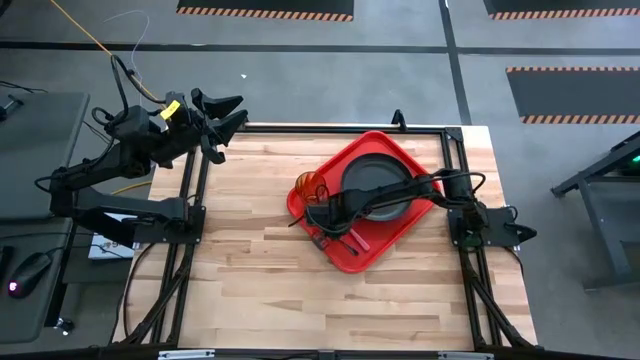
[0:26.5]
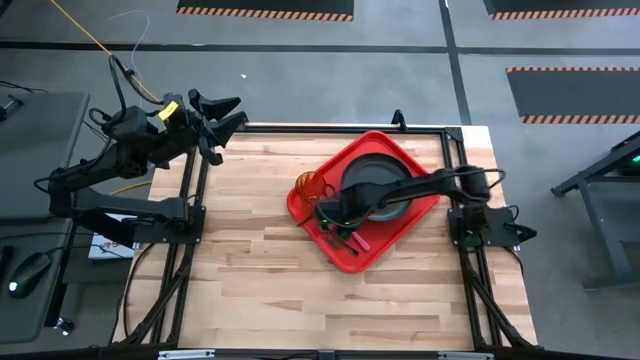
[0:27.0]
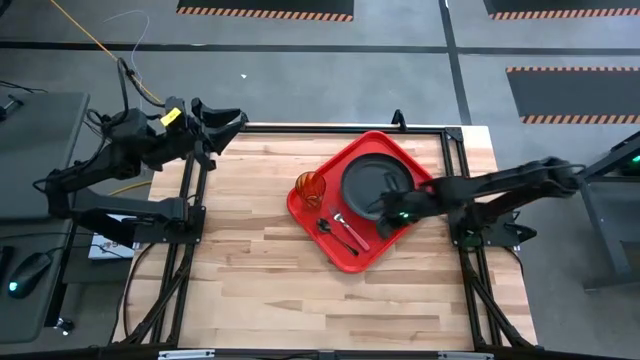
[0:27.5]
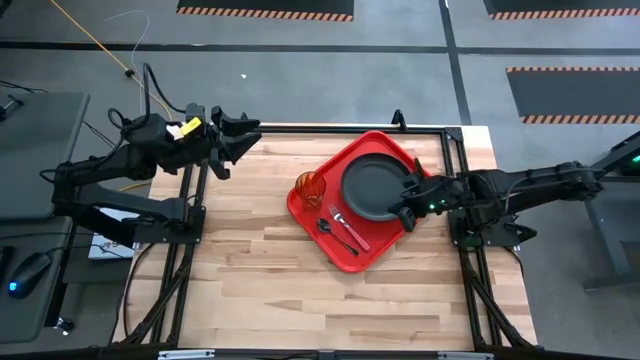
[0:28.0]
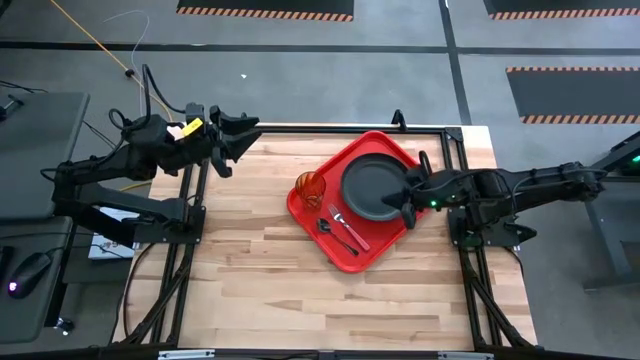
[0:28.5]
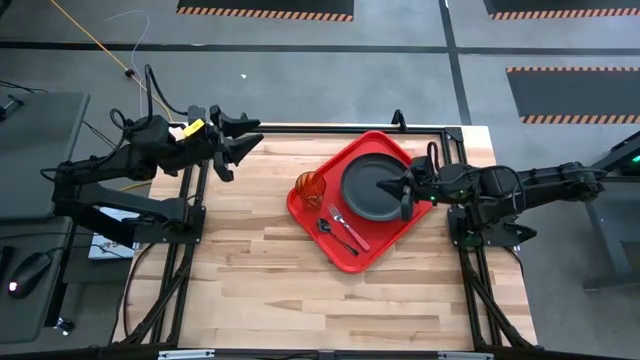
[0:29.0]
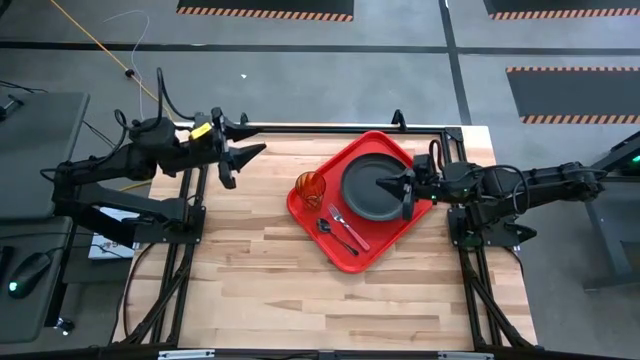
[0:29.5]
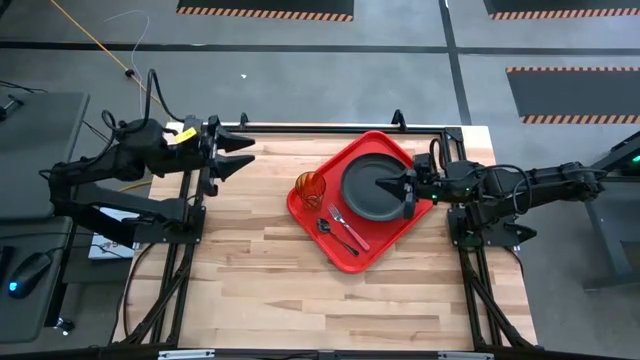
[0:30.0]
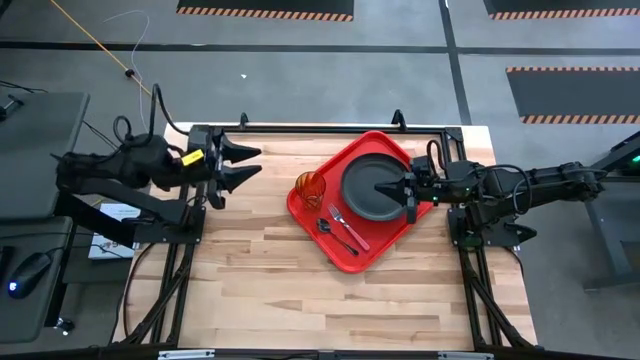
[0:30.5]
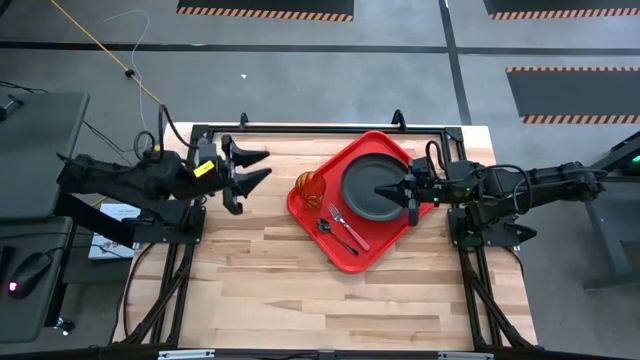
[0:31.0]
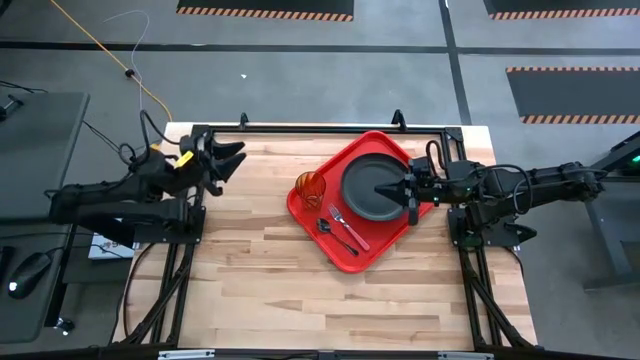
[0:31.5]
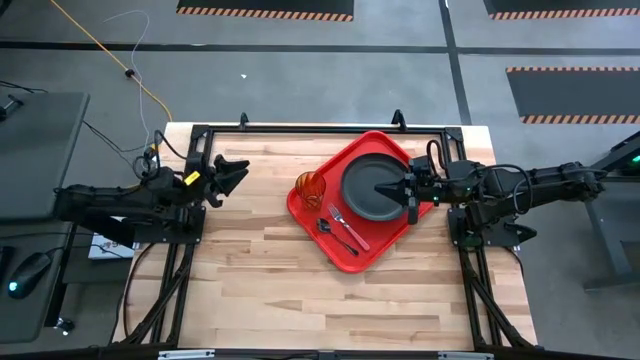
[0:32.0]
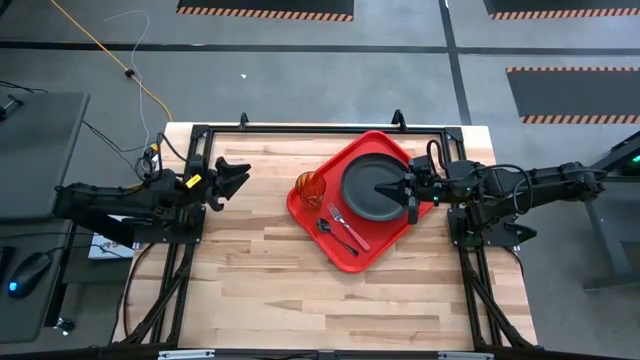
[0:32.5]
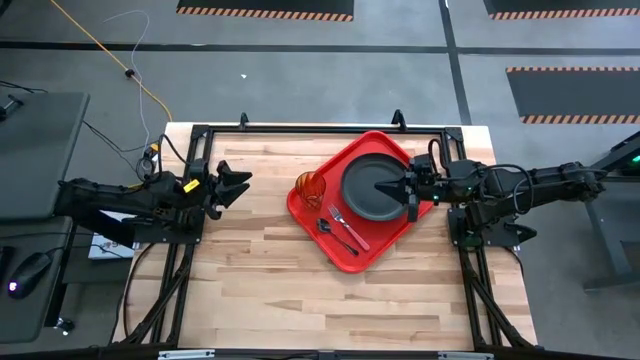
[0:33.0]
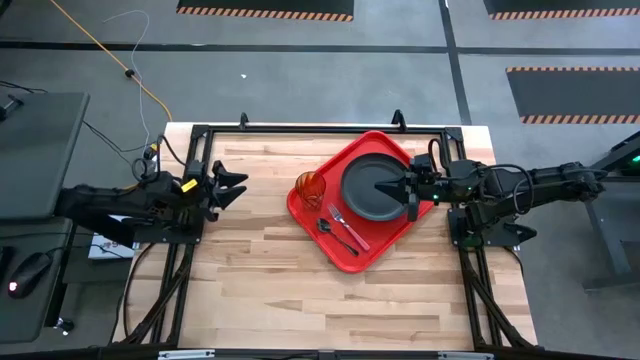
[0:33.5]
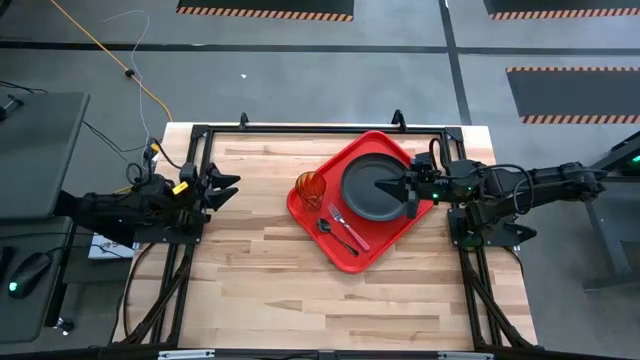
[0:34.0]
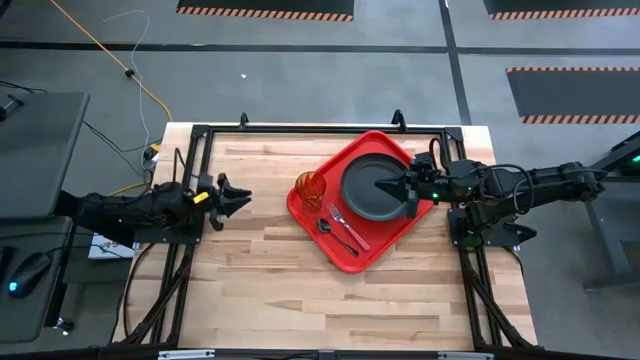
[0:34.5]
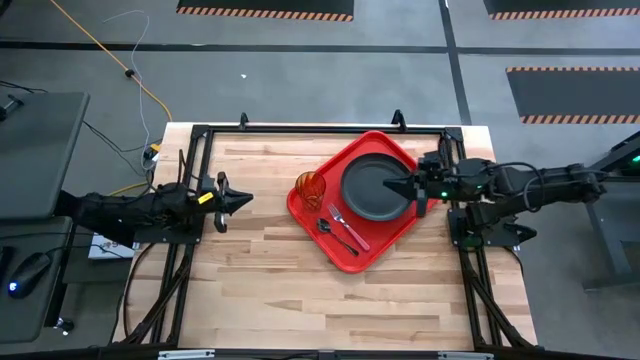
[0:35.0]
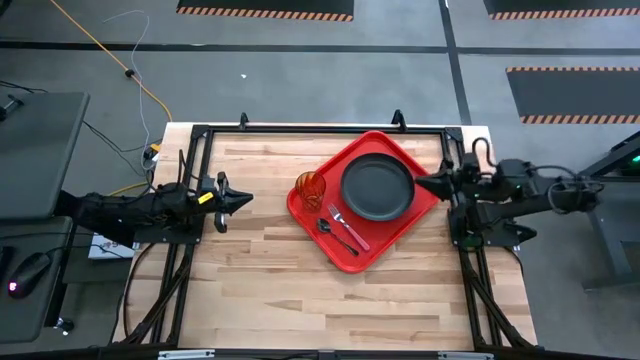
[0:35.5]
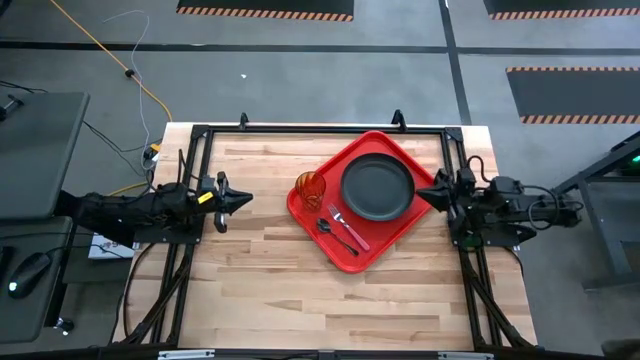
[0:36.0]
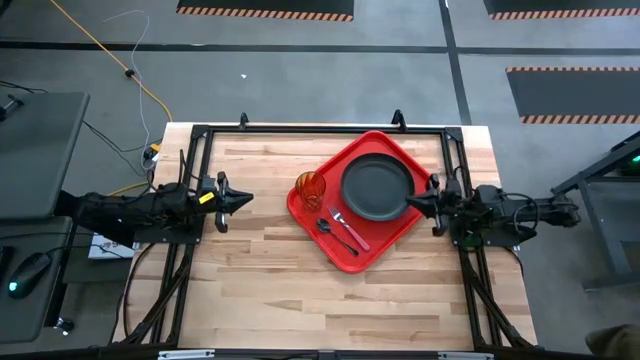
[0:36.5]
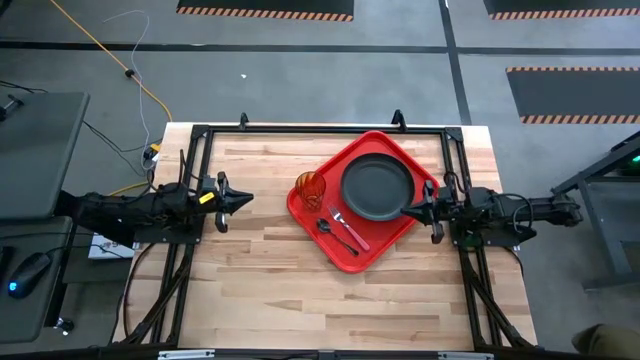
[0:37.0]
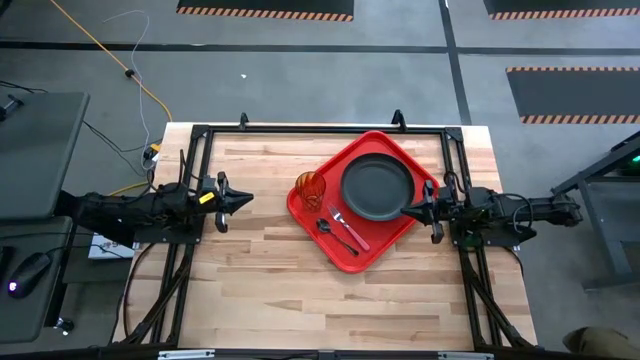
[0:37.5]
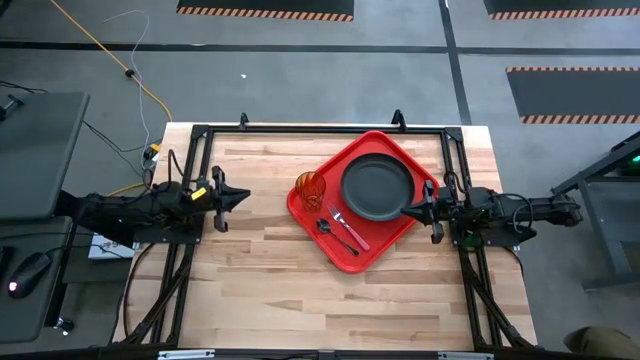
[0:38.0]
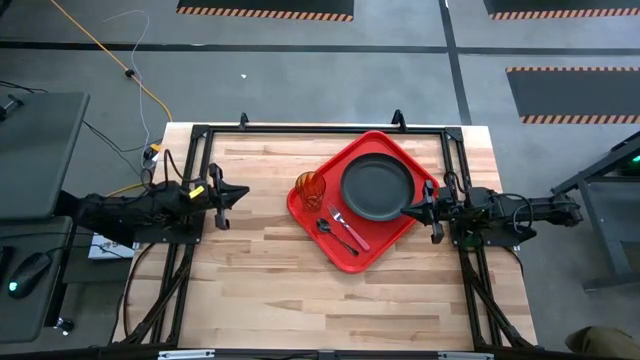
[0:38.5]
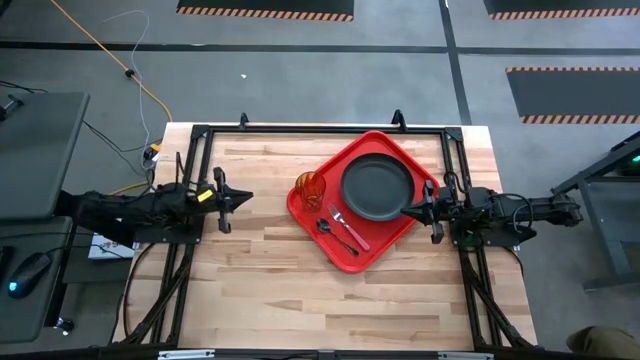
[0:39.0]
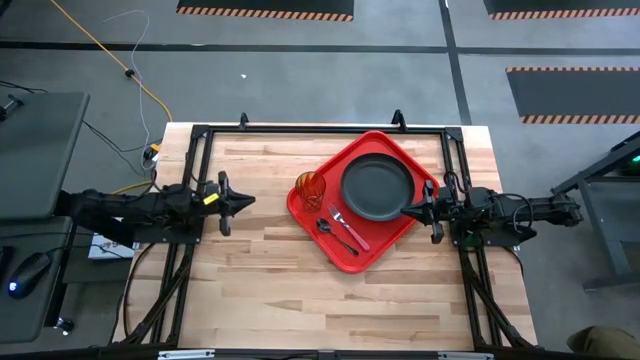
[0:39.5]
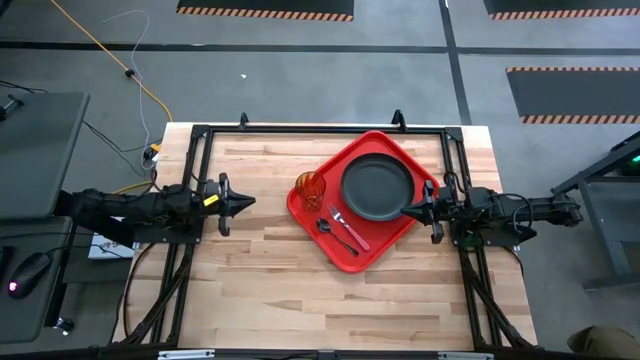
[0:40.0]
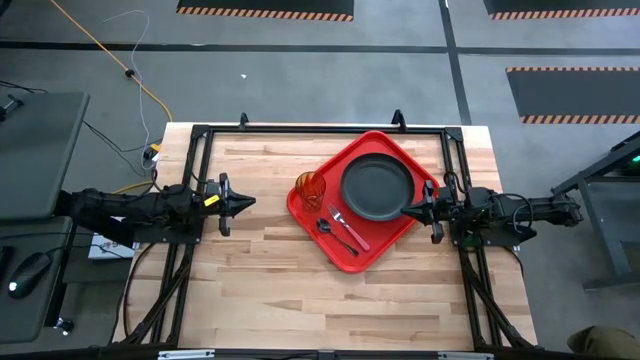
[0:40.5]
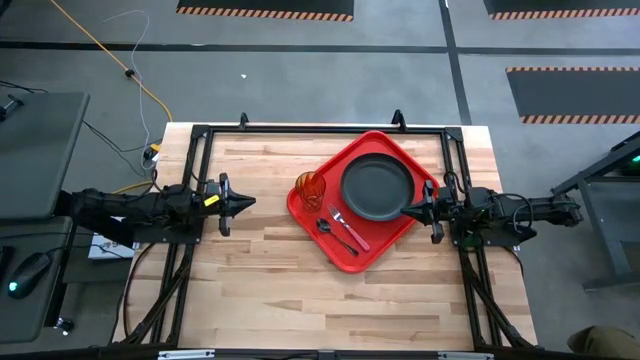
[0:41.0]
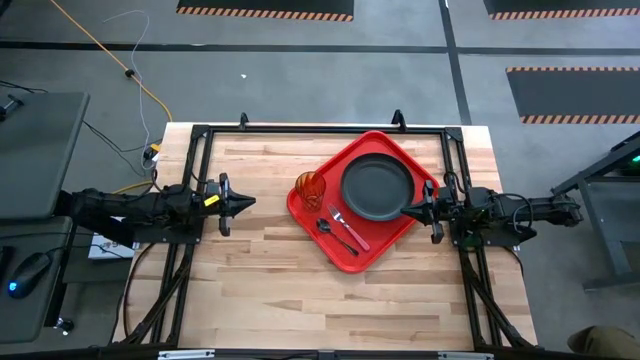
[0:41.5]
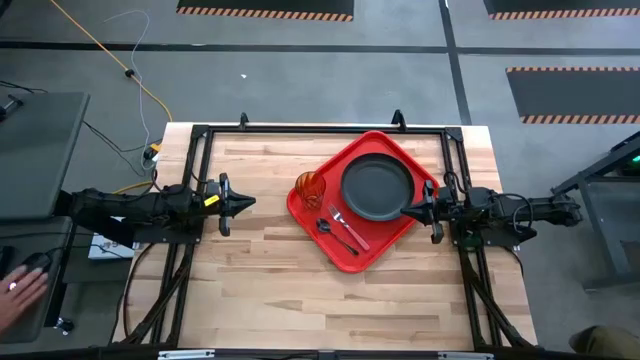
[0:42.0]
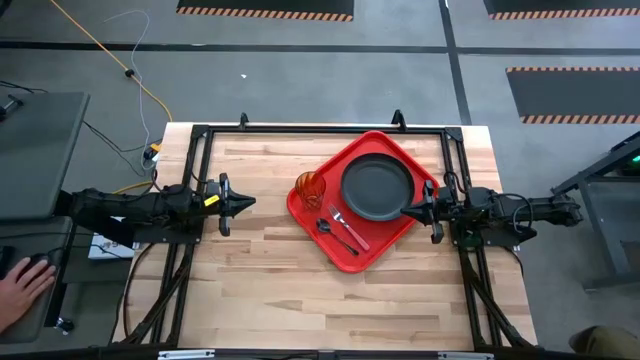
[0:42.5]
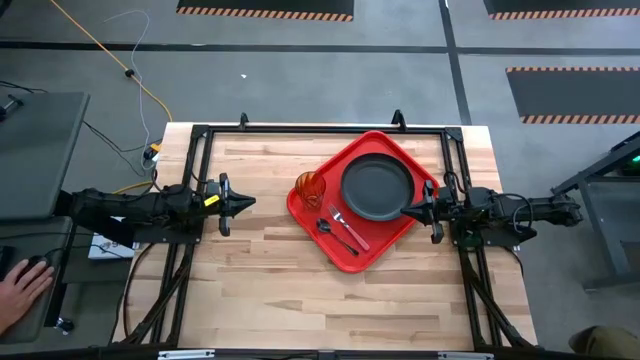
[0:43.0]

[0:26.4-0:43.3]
Task: Pick and place plate/cup/fork/spoon on tray
Return to Home Position
